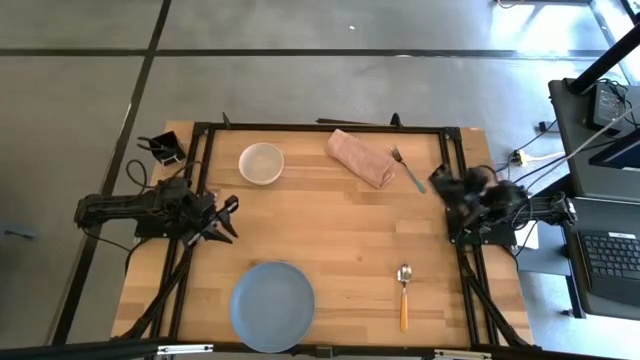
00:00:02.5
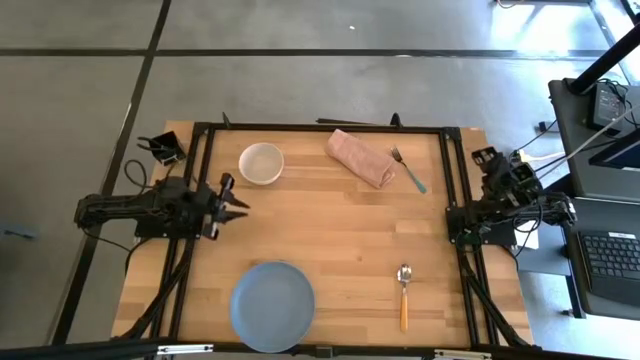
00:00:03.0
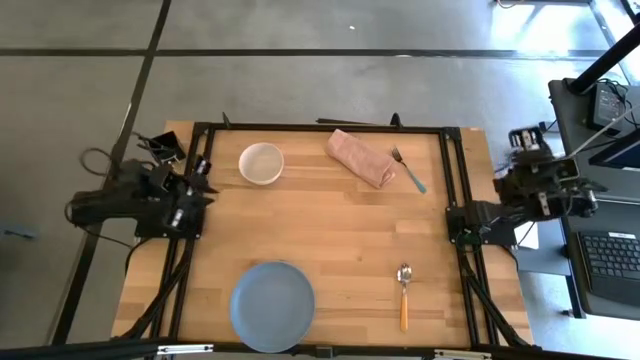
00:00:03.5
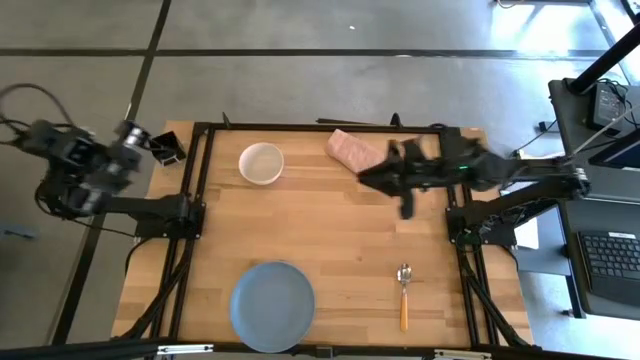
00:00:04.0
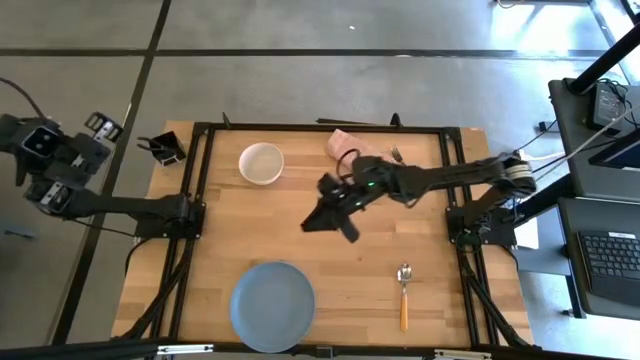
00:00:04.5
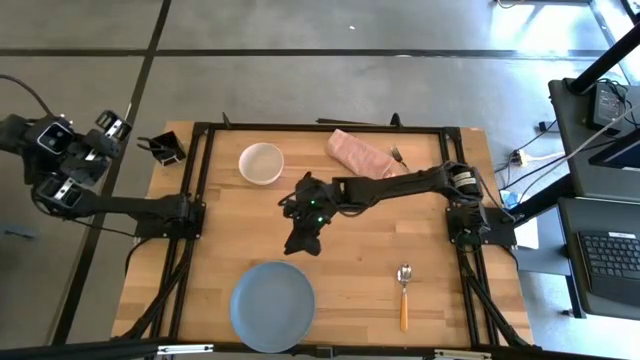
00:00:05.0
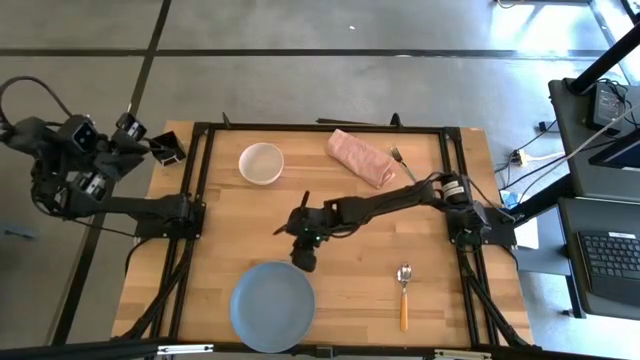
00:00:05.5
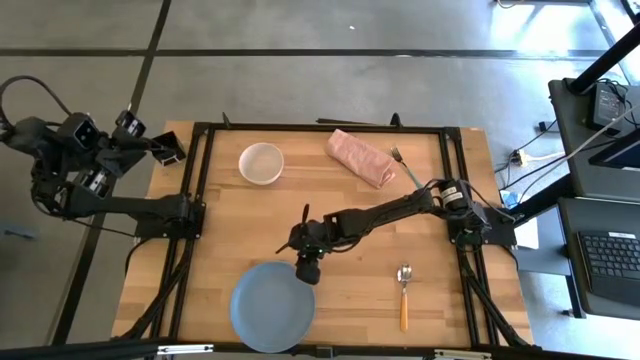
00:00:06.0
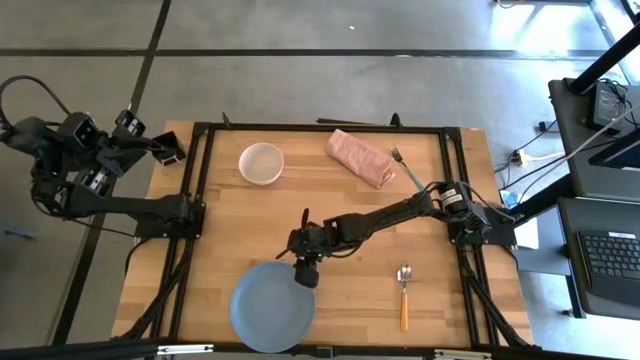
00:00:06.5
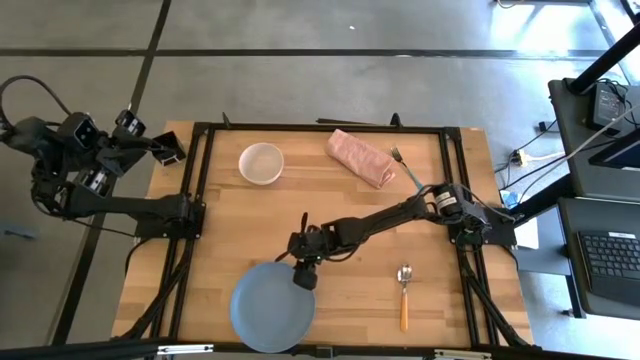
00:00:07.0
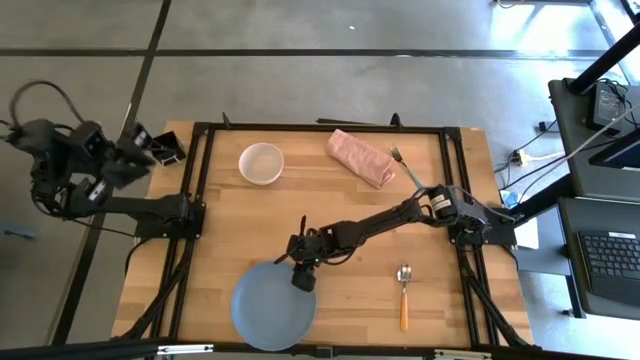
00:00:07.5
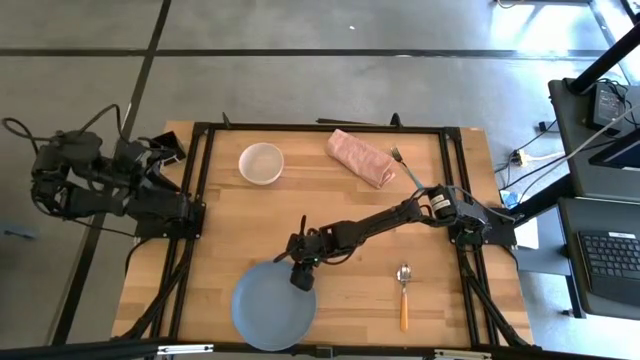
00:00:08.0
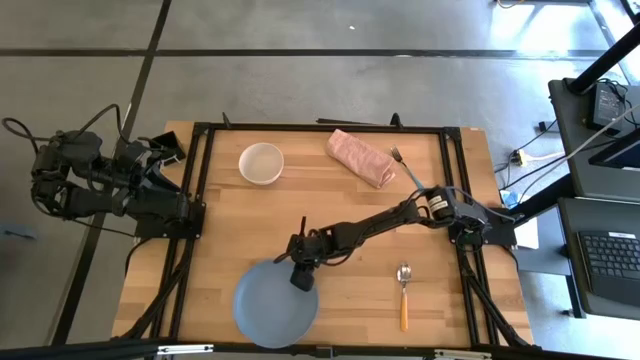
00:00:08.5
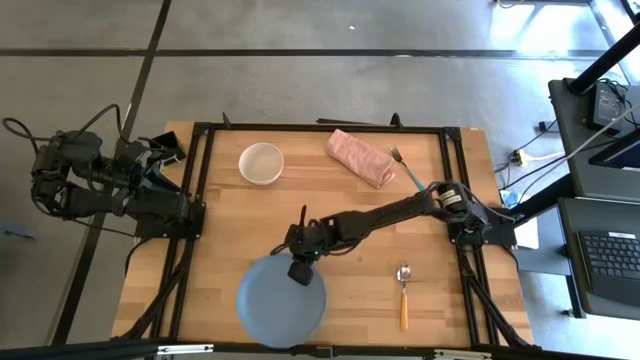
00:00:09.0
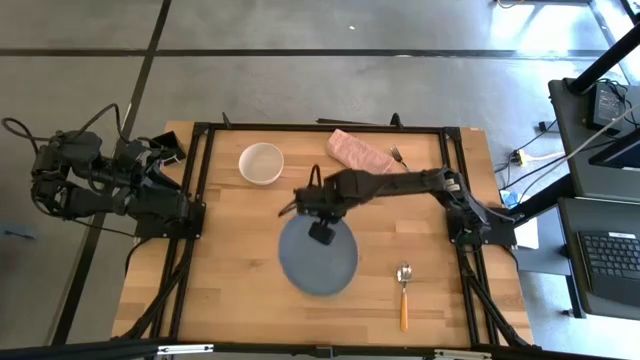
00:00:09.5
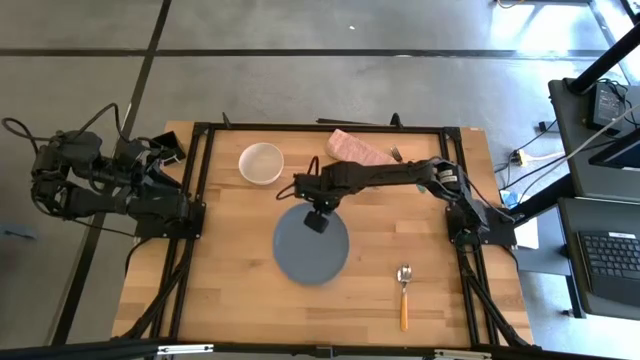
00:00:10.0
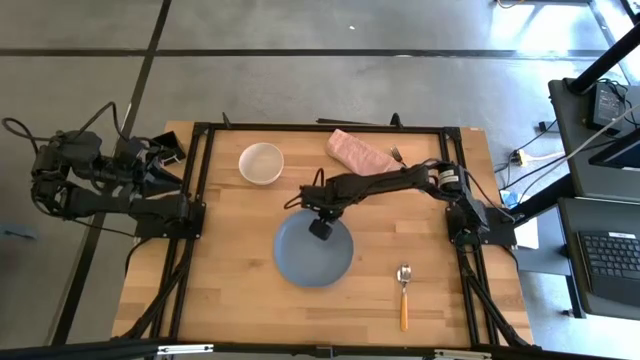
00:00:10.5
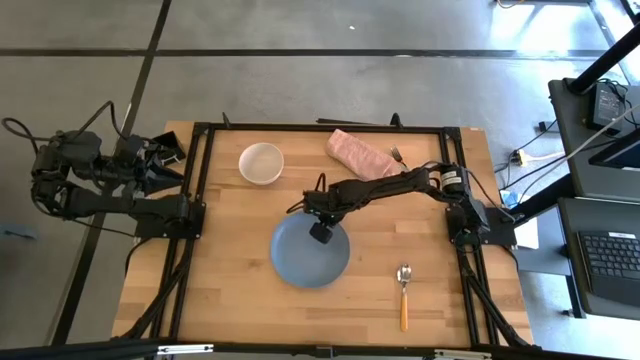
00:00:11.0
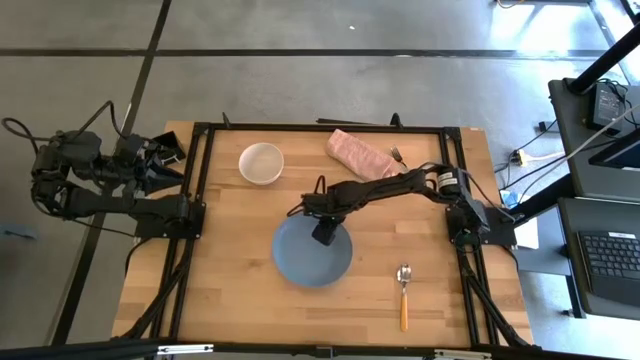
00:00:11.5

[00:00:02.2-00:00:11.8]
Task: Set table place
Move the blue plate to the center of the table

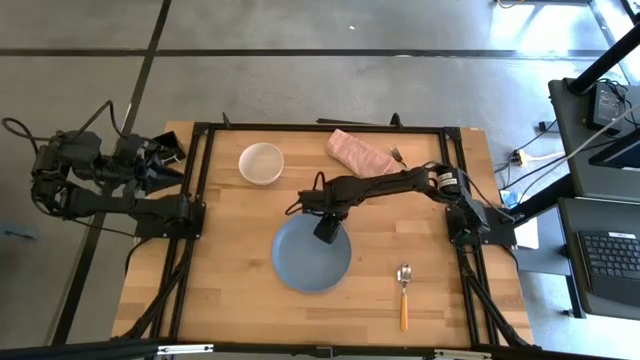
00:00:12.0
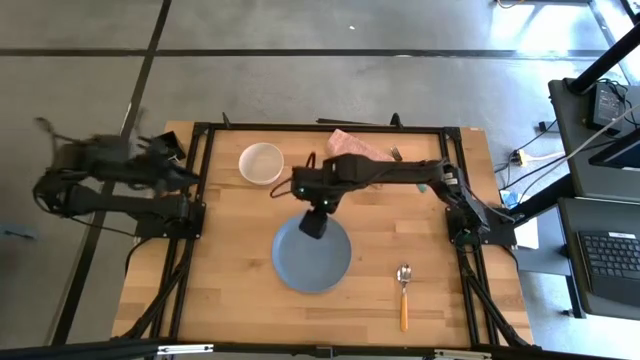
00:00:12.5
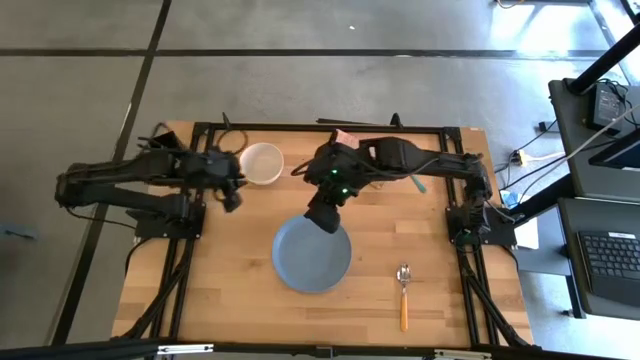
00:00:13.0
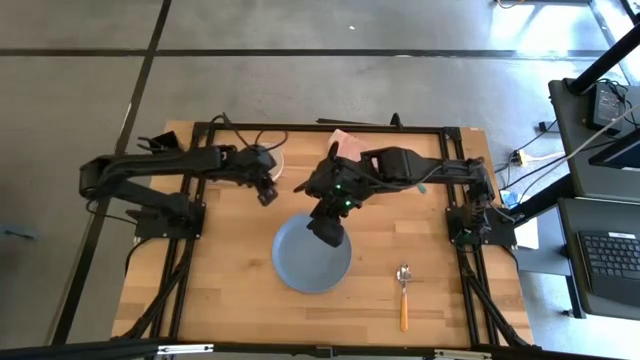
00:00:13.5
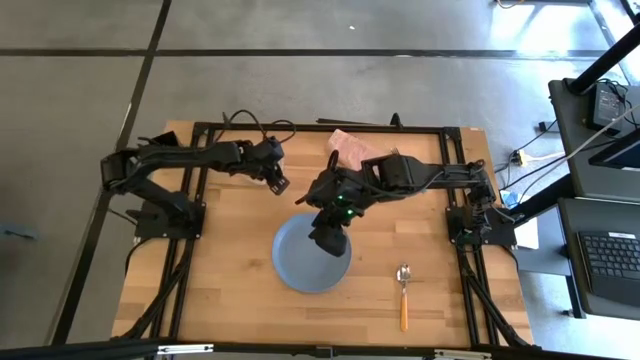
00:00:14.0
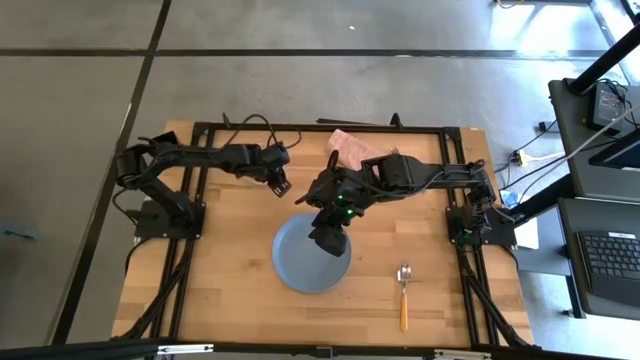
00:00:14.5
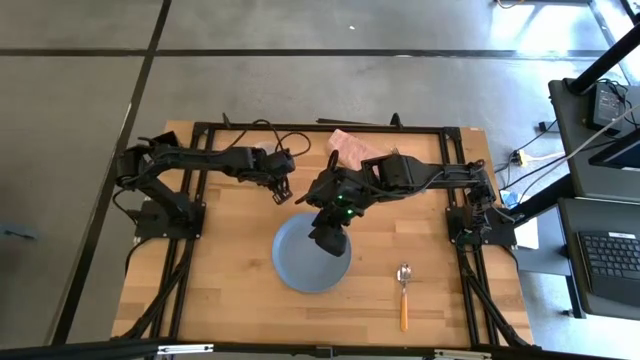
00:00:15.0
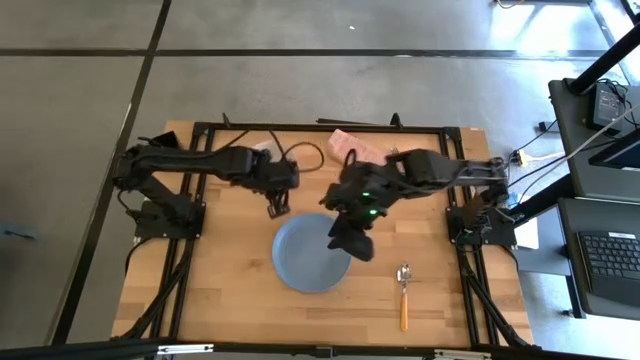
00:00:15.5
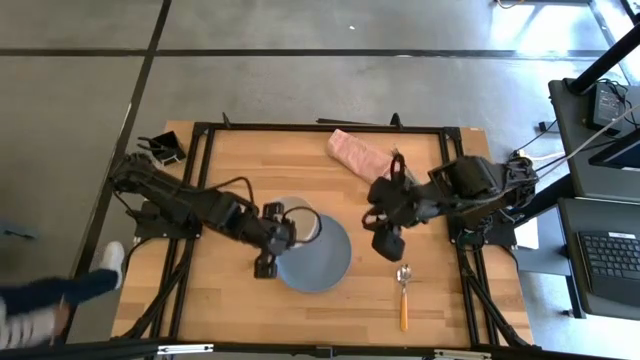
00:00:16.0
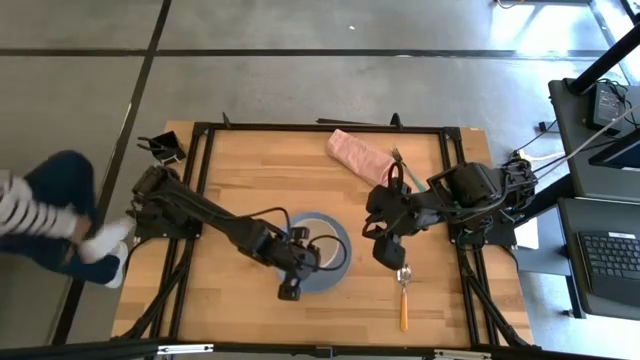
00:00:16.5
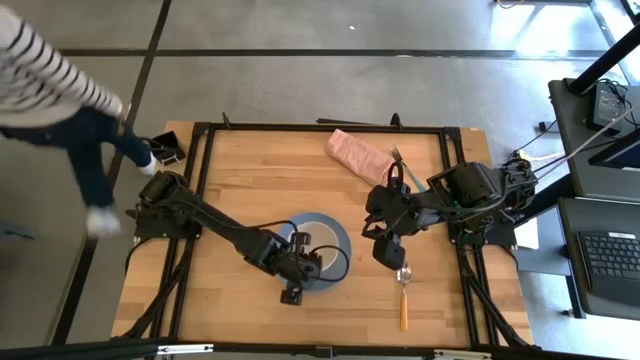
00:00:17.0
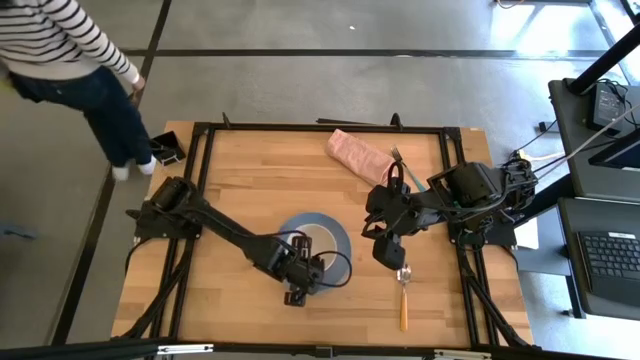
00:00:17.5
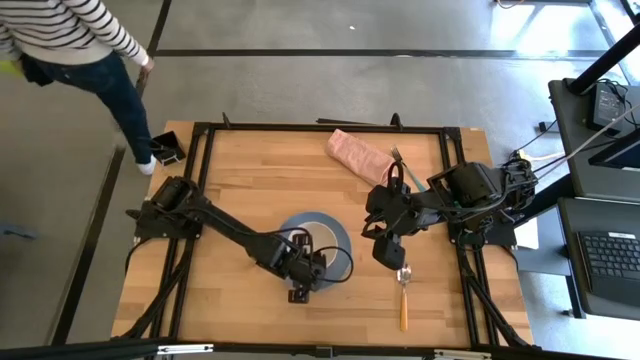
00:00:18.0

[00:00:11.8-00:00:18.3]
Stack the white bowl on the blue plate

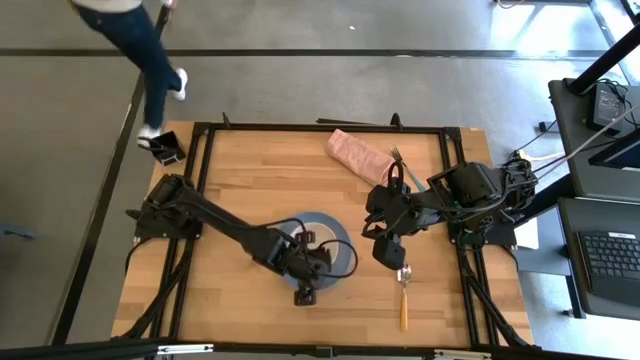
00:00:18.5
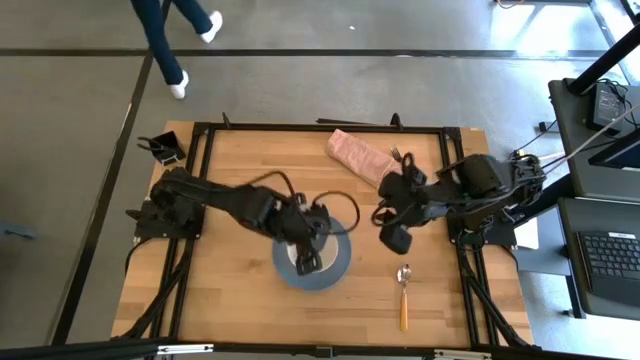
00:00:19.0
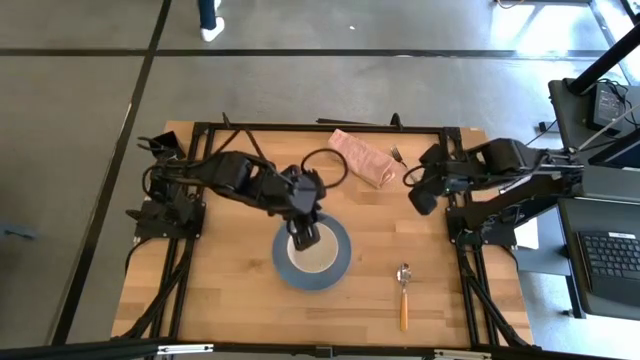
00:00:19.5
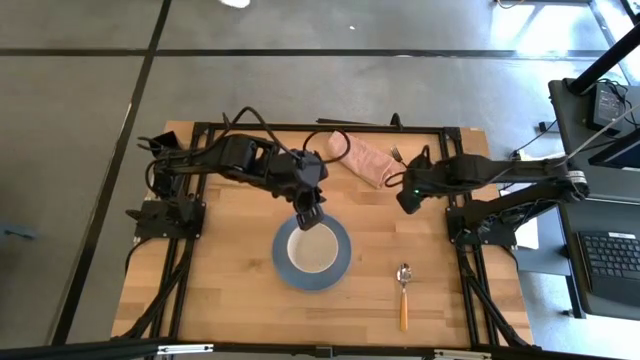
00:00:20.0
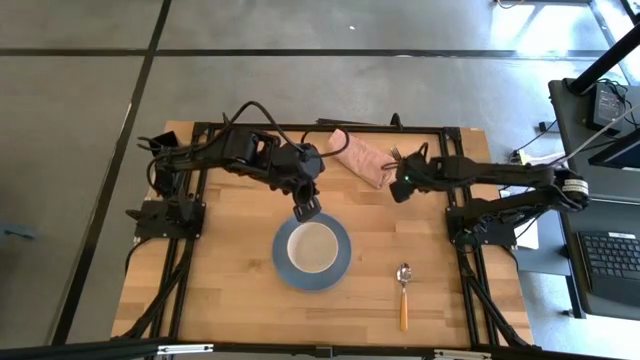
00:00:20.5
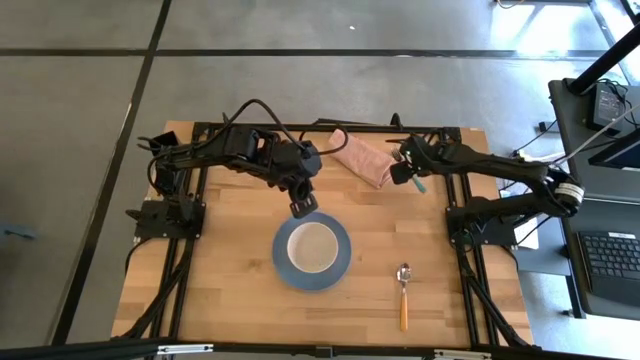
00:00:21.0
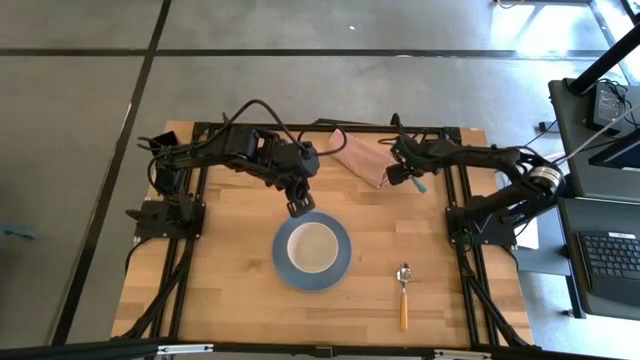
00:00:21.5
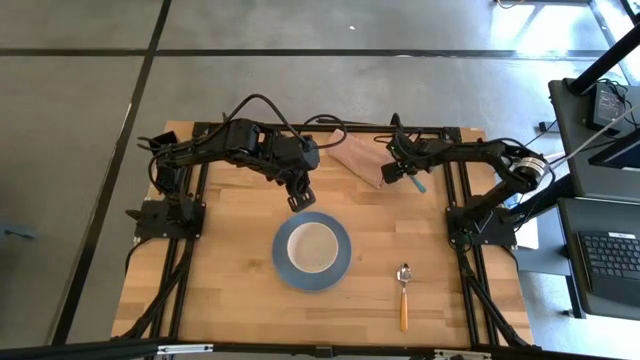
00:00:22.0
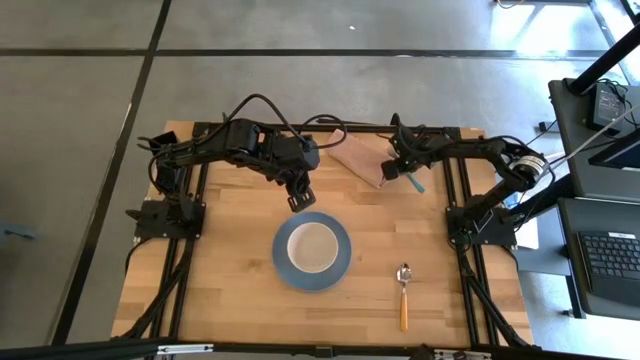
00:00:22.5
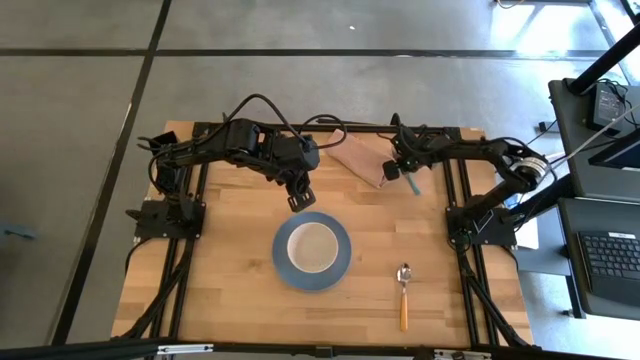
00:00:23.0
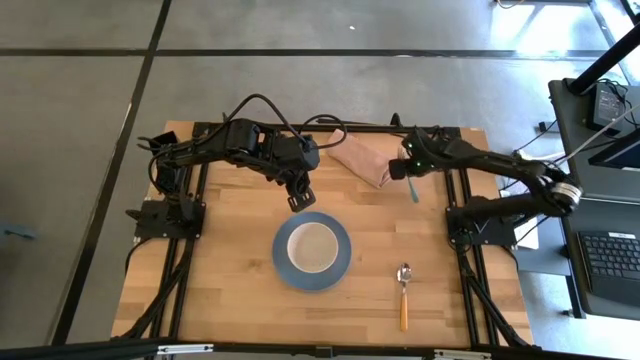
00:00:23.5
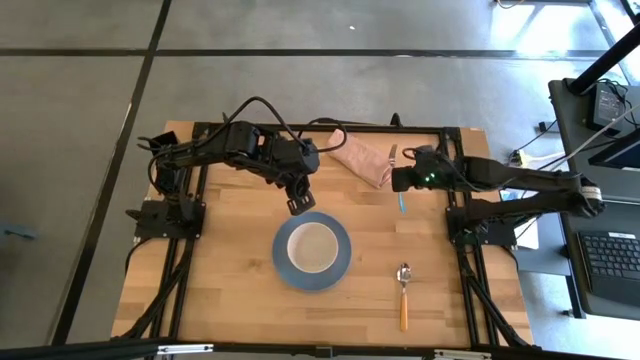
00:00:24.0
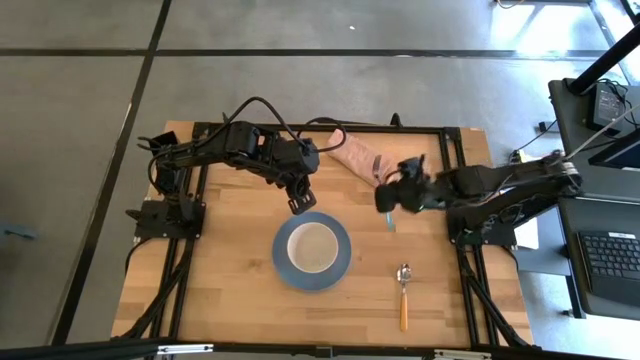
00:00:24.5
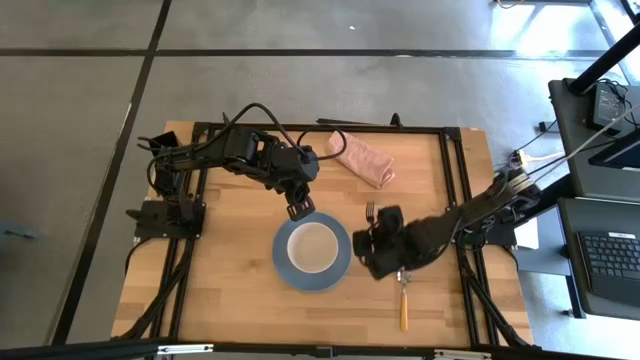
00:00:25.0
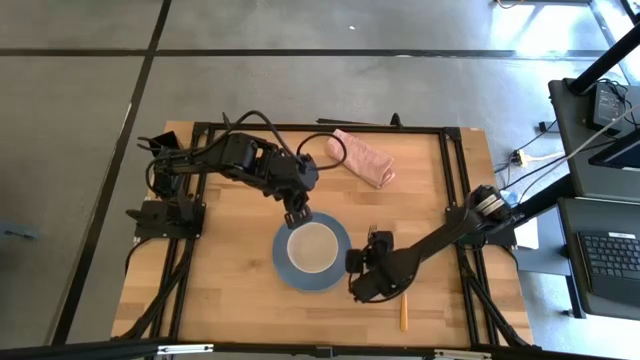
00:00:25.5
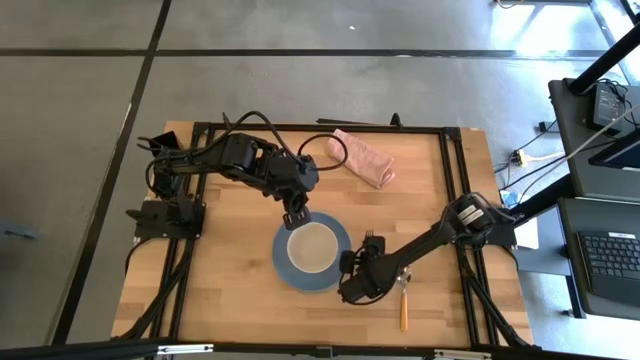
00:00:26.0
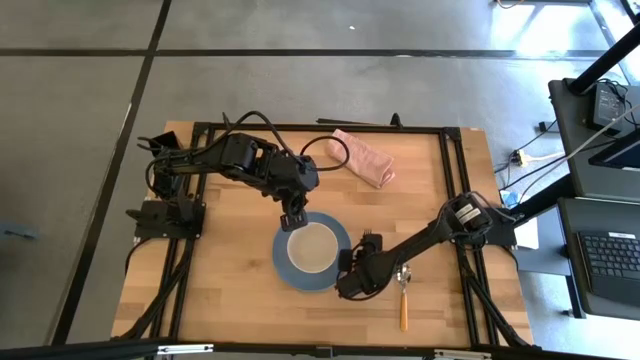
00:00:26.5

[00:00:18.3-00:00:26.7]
Put the blue fork to the right of the blue plate
